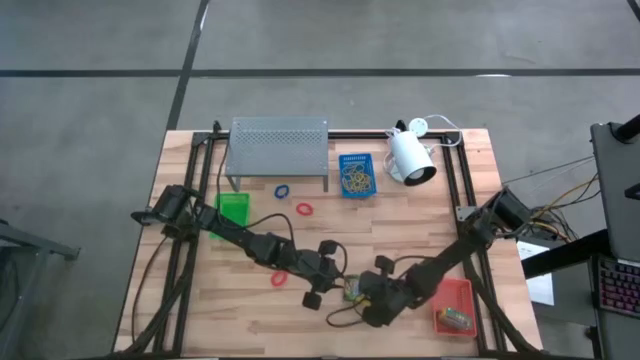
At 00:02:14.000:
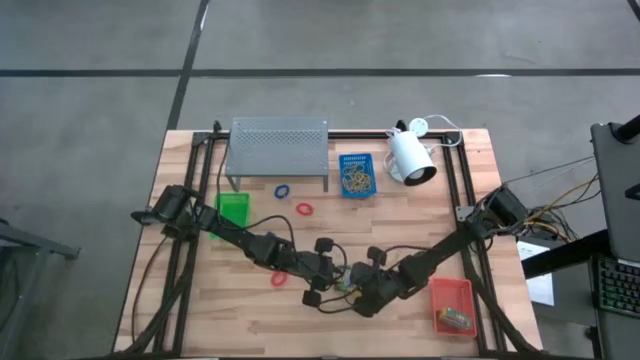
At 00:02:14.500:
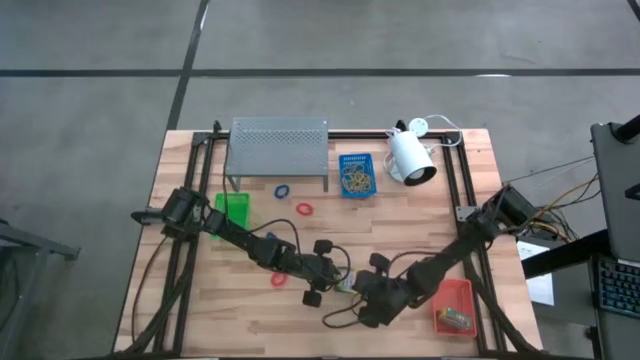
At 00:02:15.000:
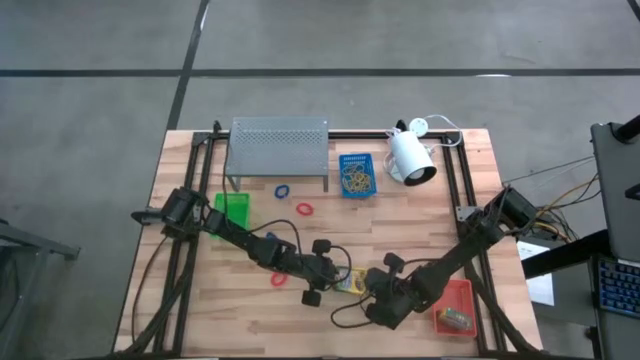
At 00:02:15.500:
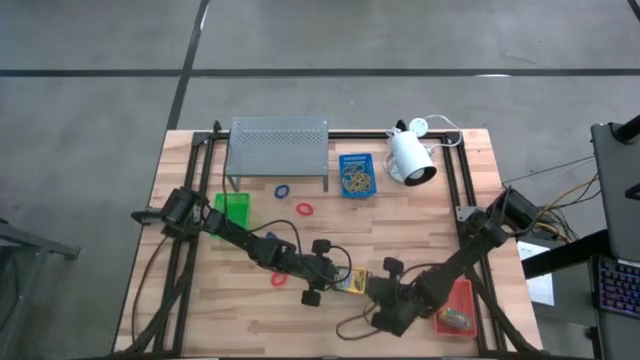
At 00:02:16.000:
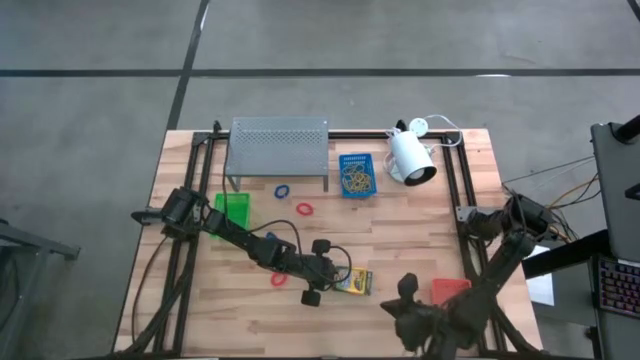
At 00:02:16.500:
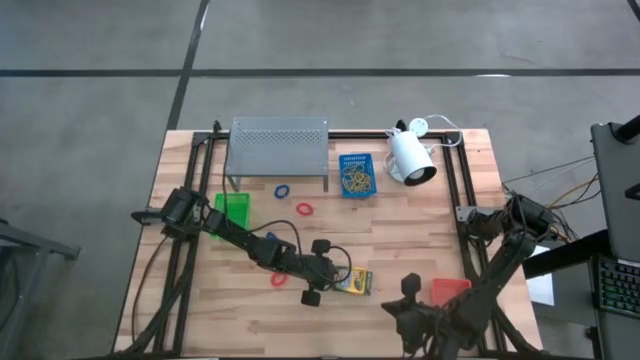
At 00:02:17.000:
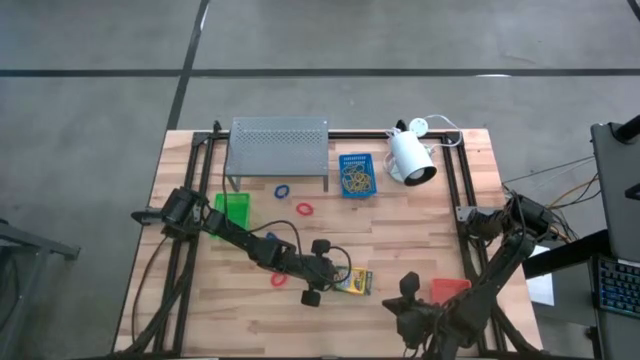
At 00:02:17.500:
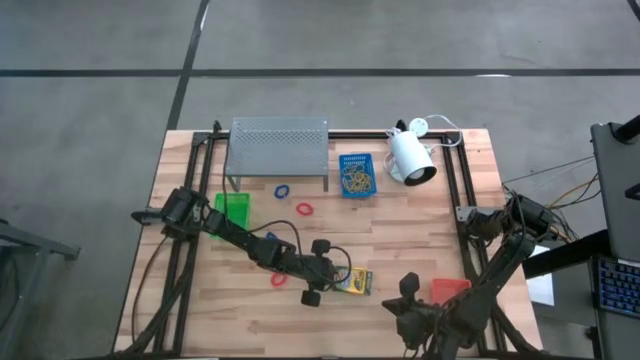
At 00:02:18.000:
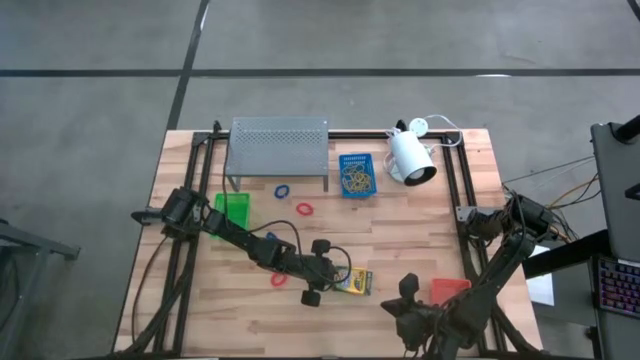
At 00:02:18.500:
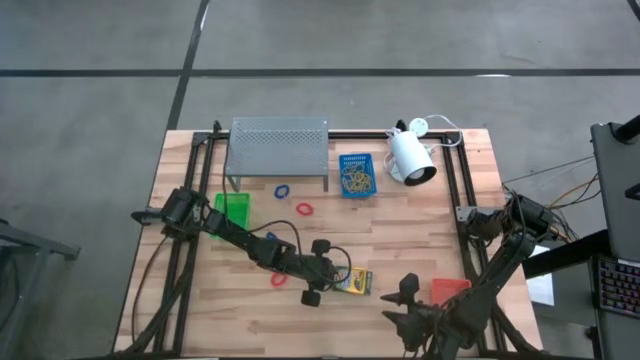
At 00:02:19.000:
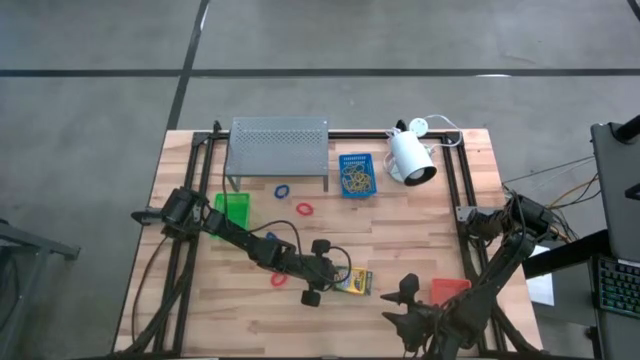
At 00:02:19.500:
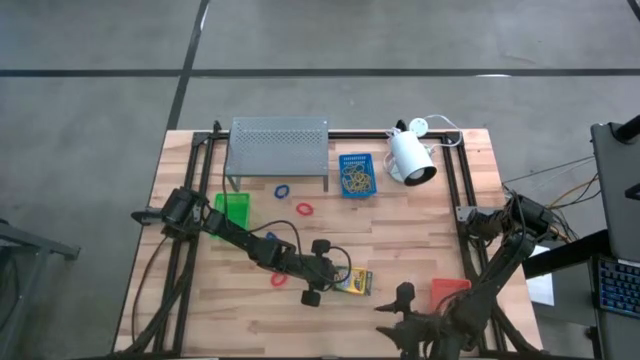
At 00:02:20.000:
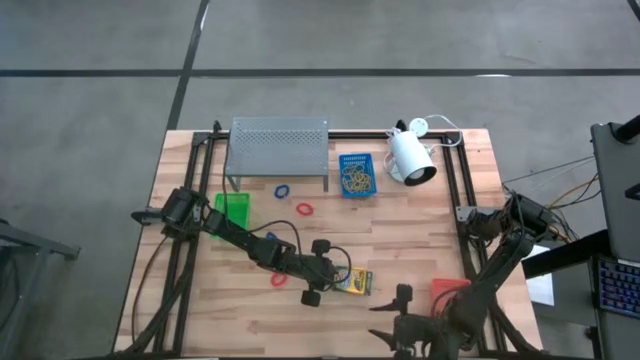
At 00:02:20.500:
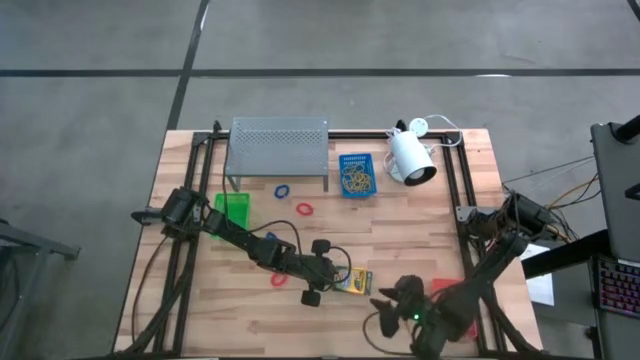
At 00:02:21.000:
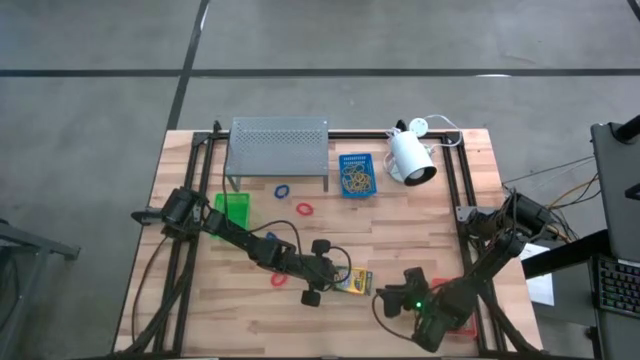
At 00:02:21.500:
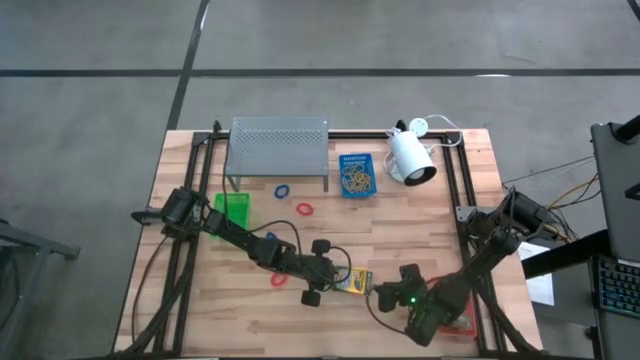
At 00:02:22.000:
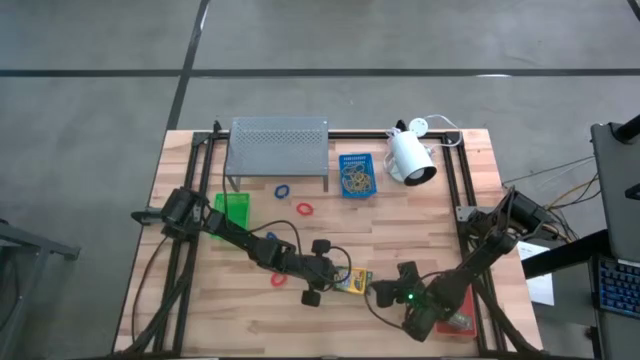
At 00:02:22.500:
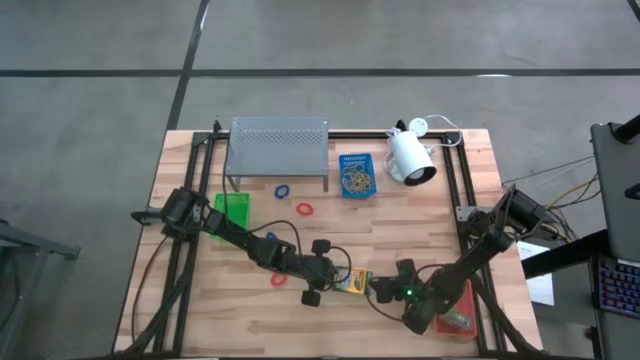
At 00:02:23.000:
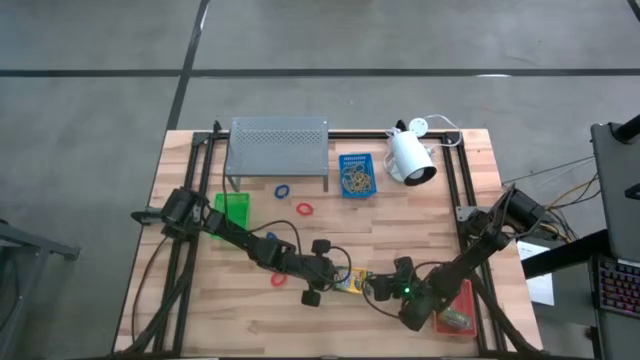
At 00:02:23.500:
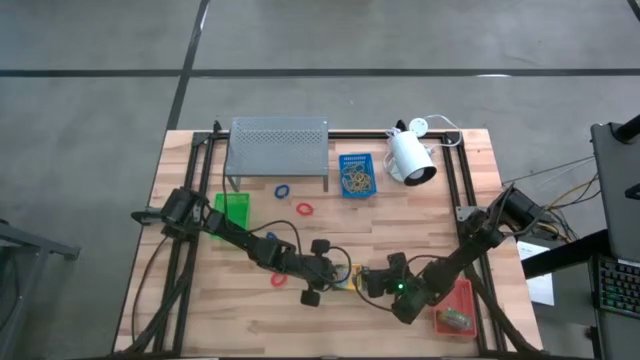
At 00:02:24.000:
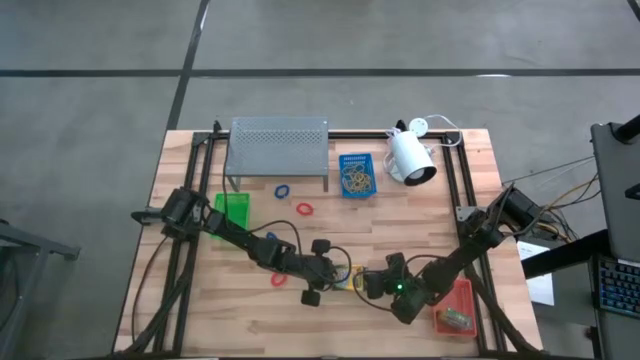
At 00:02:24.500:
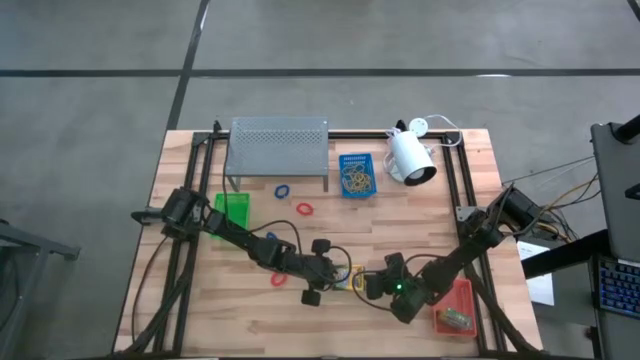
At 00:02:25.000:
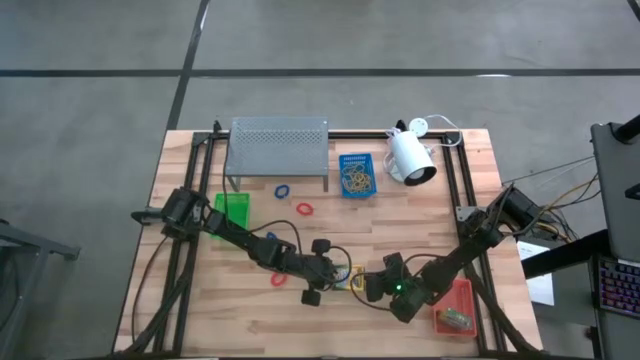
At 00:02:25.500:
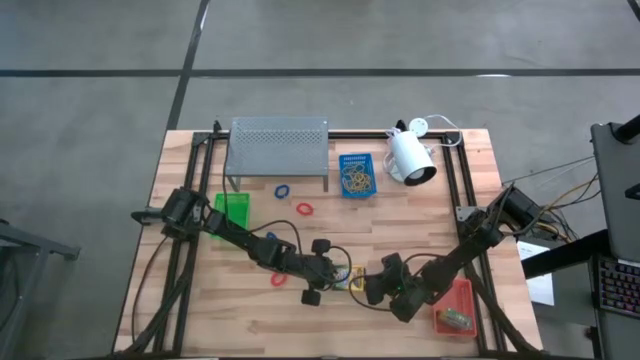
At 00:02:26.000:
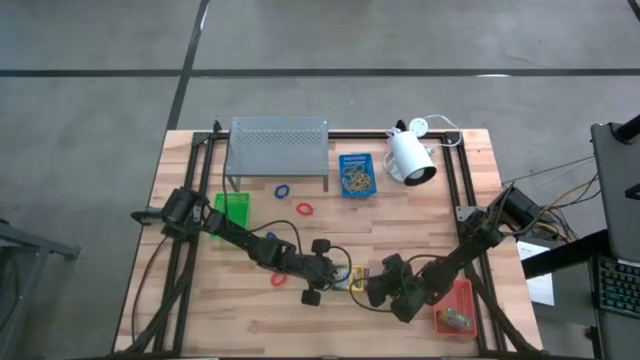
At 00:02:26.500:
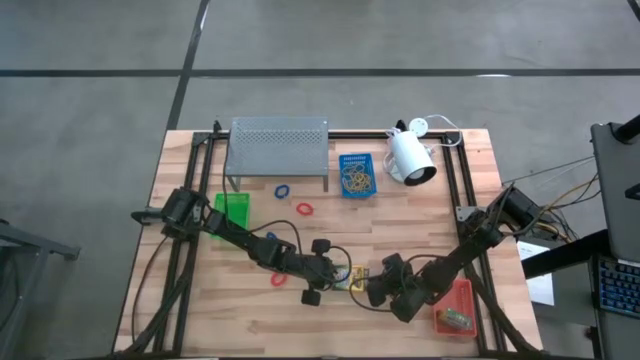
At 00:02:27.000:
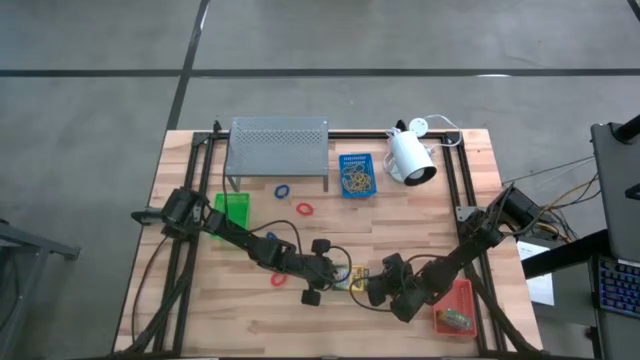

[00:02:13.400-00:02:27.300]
Task: Pick & Place Office Desk Supplies
Put the yellow crayon box into the orange bin

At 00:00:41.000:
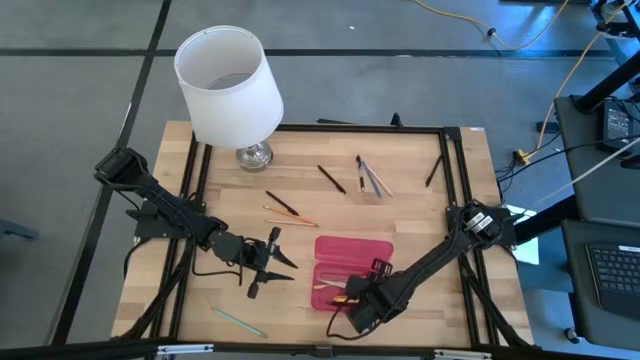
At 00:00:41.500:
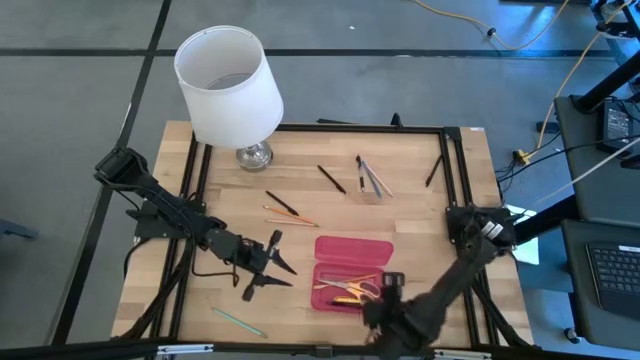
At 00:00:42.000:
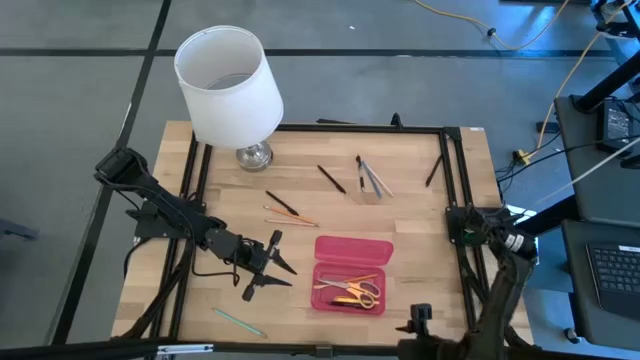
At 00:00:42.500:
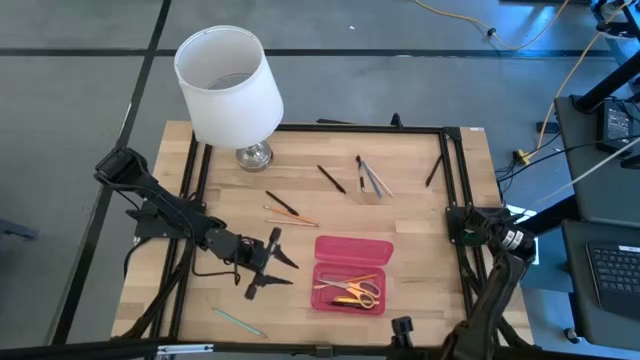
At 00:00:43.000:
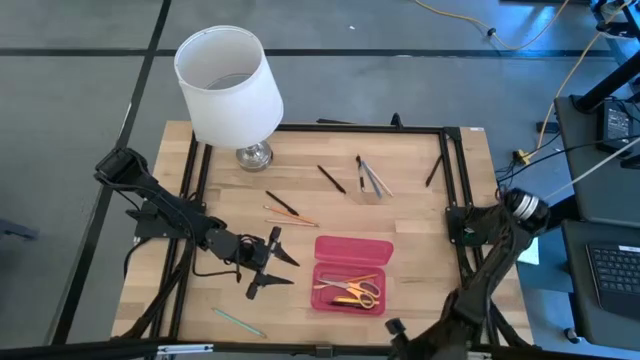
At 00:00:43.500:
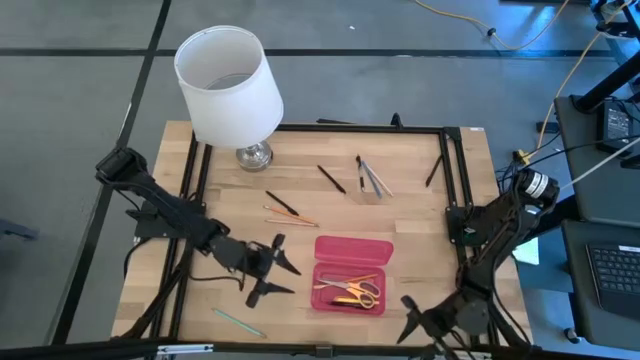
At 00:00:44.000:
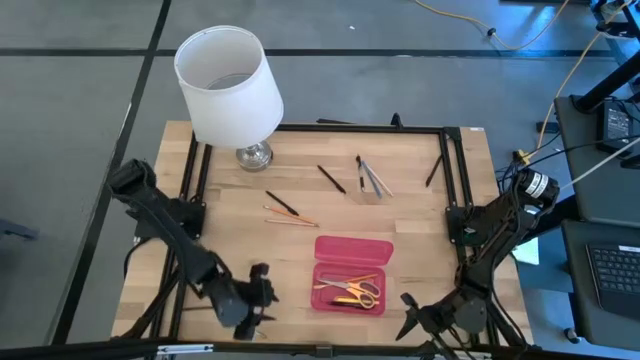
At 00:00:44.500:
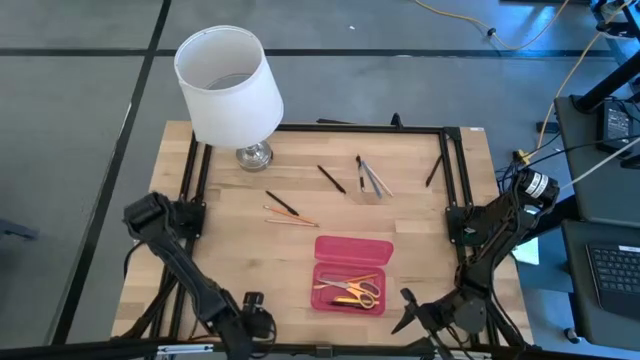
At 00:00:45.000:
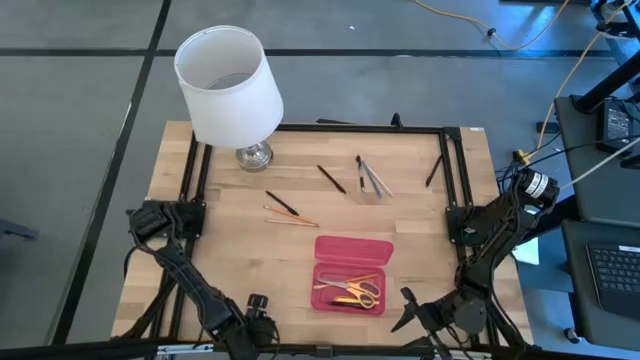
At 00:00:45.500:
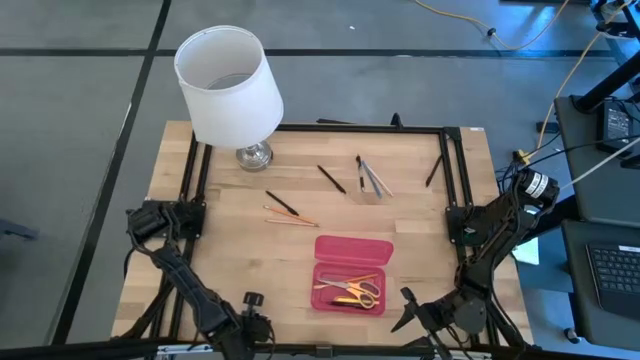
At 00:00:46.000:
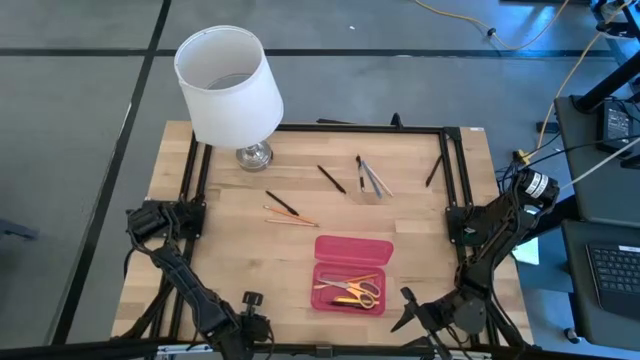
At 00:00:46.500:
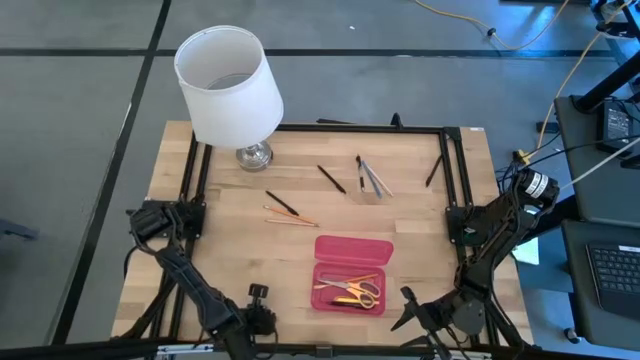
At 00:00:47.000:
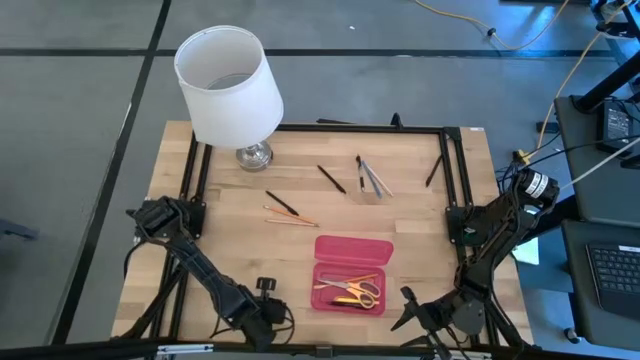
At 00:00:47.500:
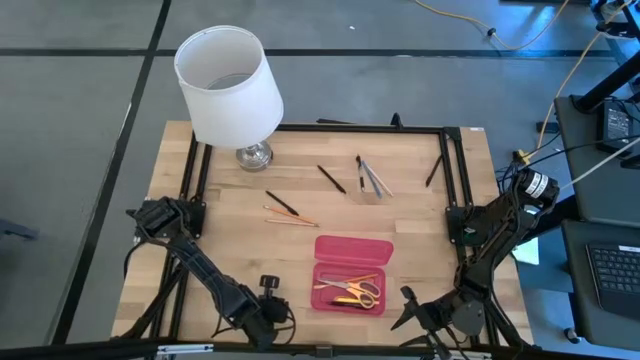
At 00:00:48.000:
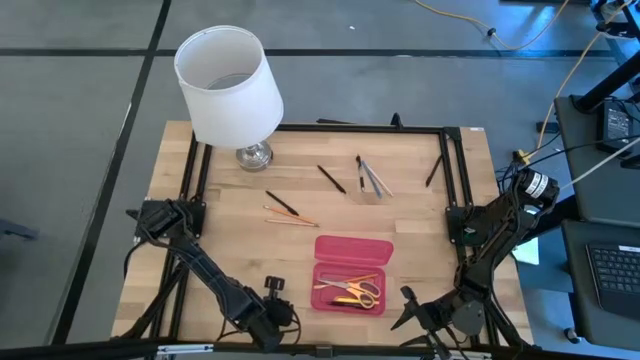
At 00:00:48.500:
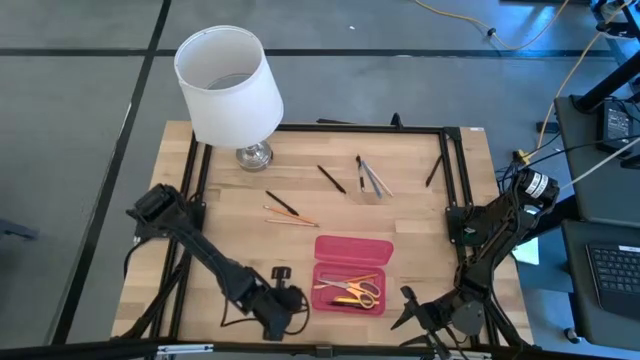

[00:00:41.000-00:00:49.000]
Task: Pick & place school supplies into a supply box
Put the blue supply into the pink supply box
